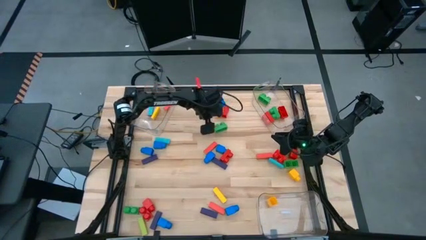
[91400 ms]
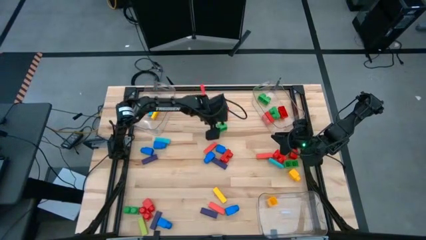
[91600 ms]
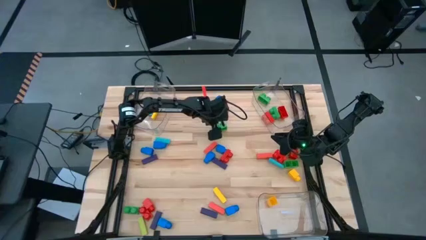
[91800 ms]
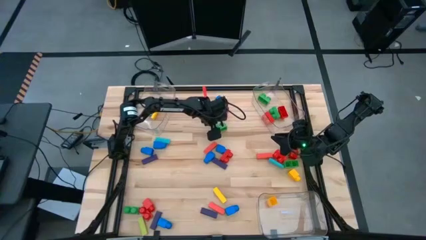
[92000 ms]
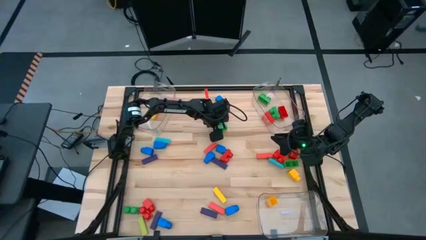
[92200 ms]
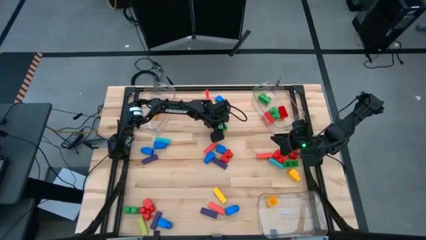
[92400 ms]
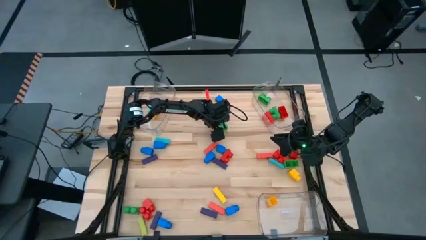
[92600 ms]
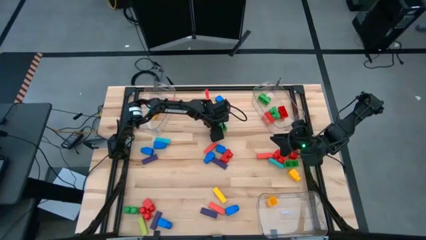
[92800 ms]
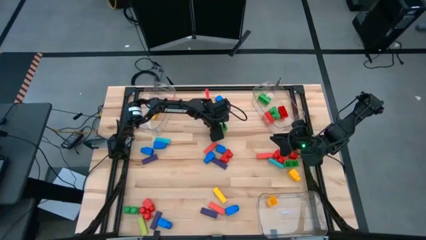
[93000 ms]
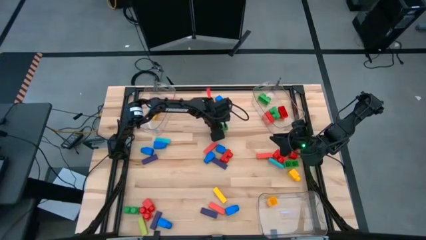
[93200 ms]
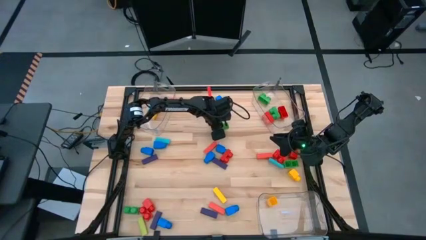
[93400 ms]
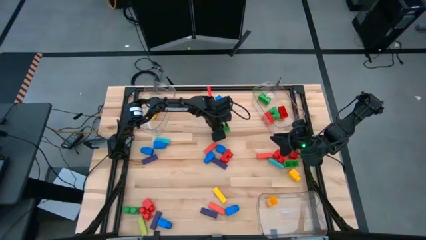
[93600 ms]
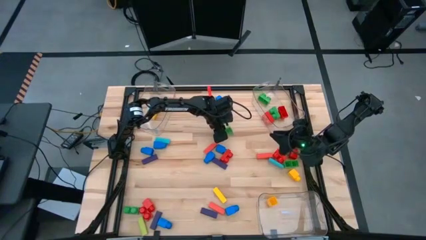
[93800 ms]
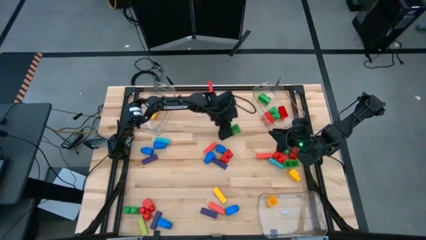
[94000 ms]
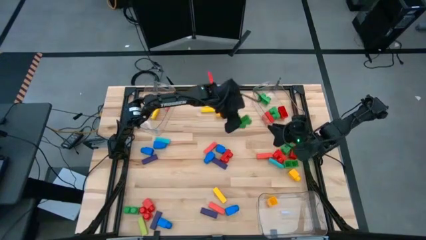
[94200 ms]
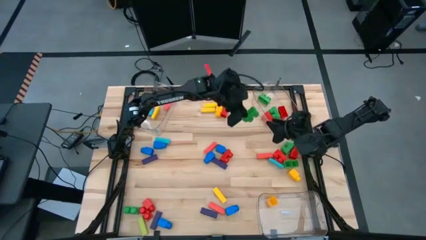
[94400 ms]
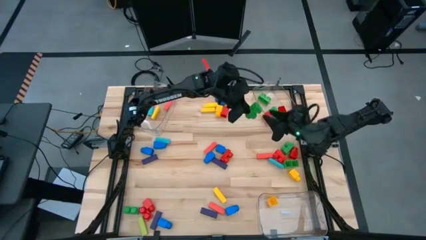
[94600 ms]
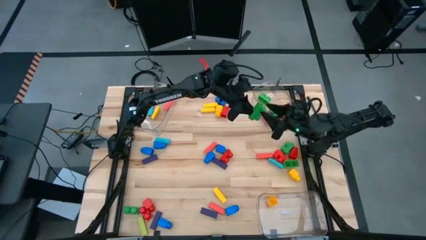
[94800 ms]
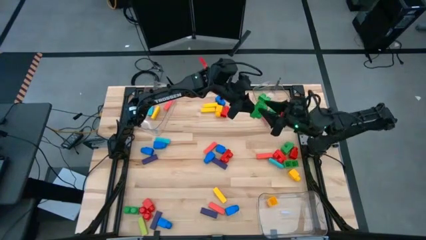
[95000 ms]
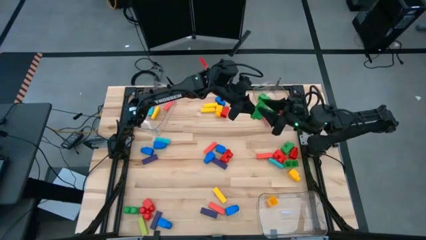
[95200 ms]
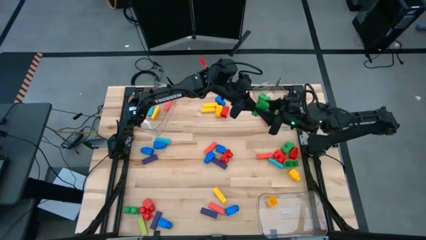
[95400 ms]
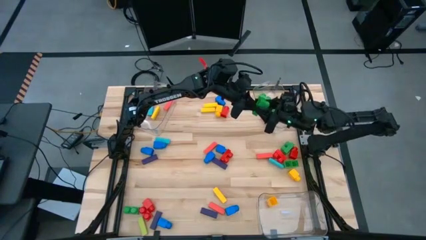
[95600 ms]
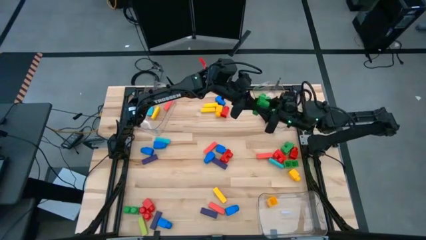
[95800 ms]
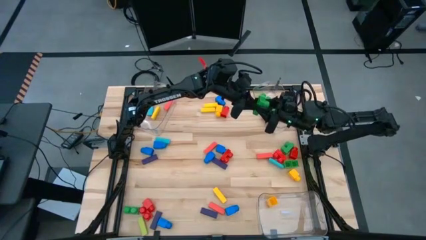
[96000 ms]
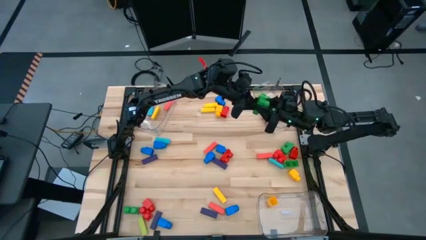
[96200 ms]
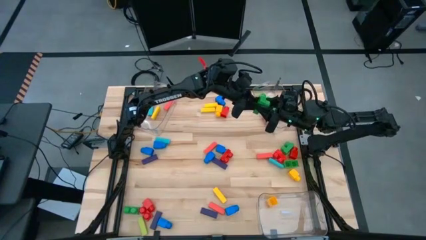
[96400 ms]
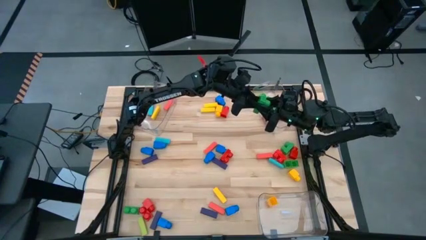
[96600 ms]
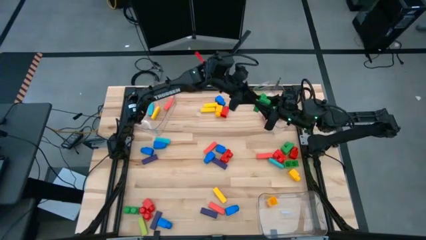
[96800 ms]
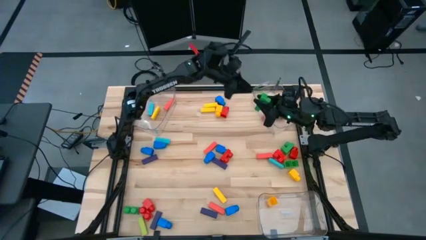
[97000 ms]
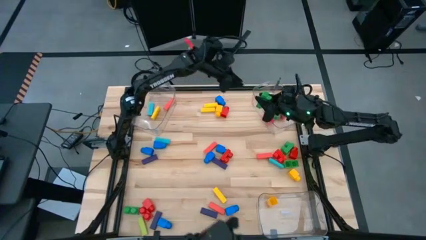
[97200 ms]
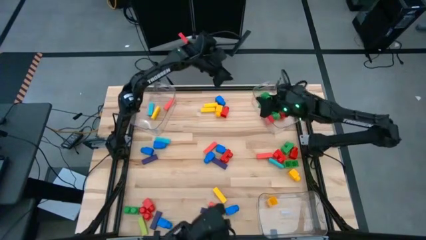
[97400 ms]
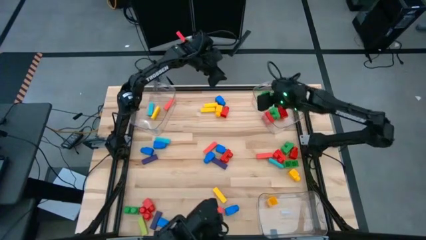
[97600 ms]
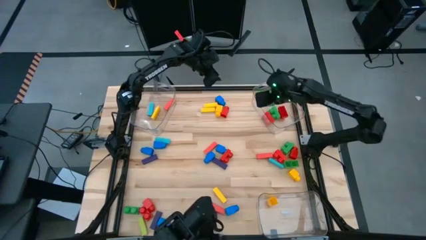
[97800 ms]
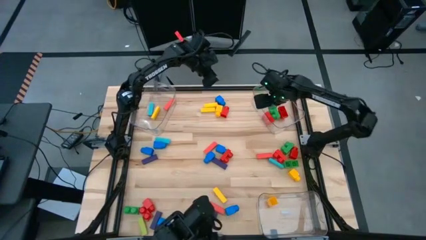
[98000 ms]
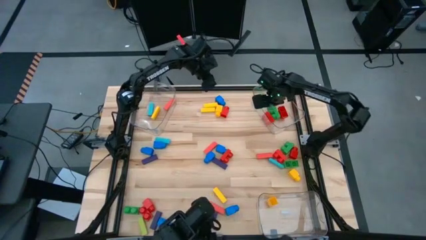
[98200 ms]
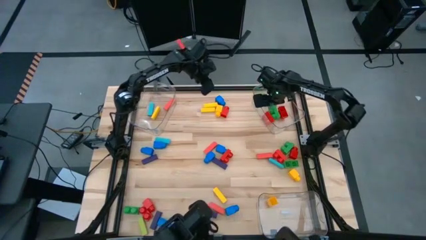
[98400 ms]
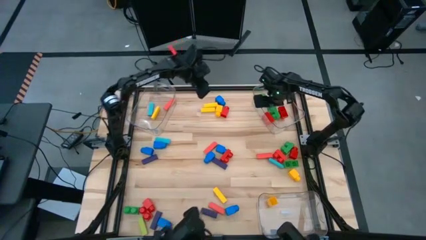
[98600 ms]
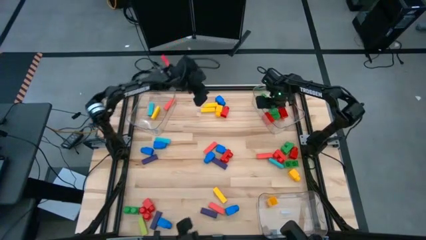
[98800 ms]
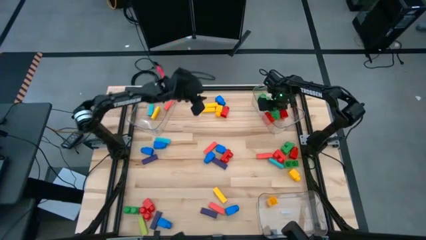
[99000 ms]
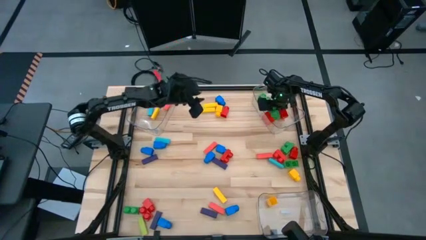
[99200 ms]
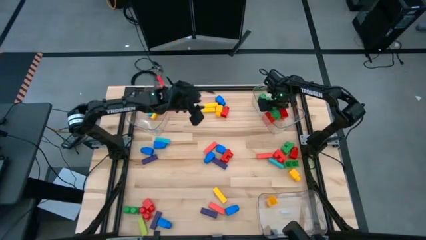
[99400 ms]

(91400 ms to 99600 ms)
Task: Sort blocks by size
Put the green 2 stud game piece into the top right transparent bin

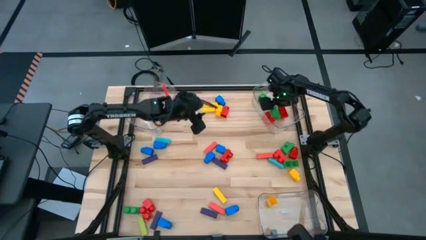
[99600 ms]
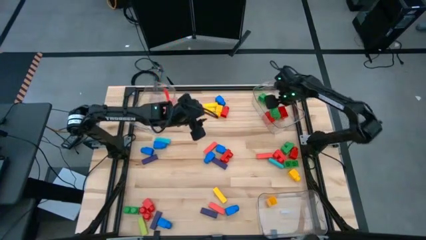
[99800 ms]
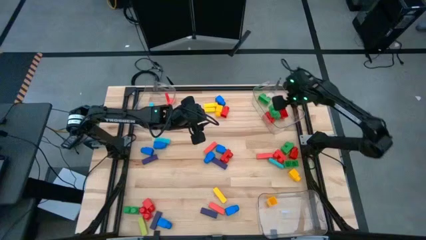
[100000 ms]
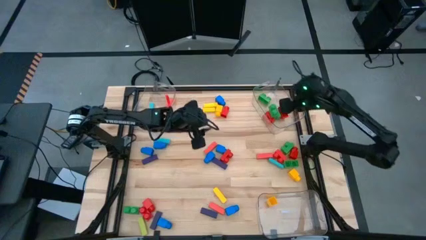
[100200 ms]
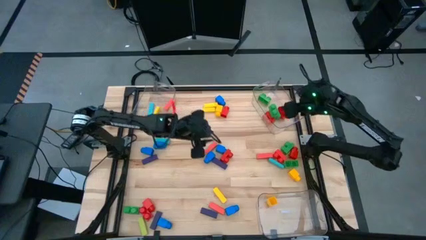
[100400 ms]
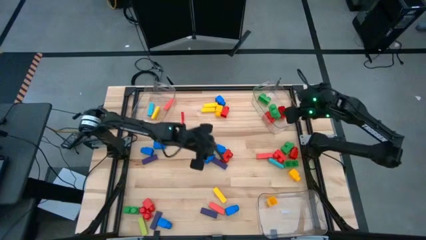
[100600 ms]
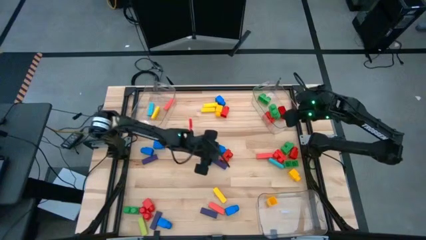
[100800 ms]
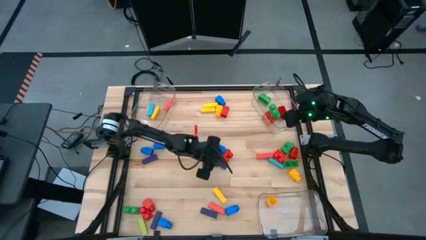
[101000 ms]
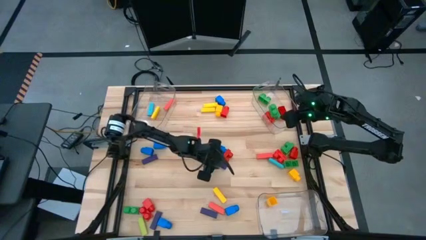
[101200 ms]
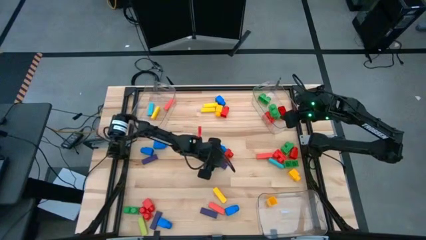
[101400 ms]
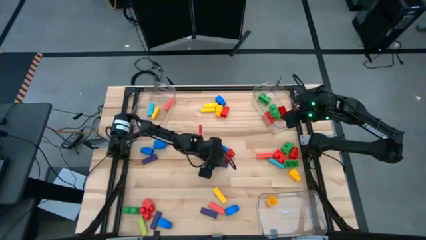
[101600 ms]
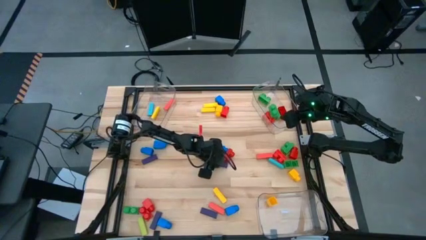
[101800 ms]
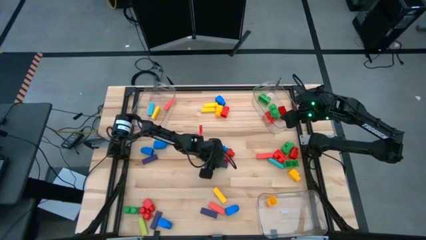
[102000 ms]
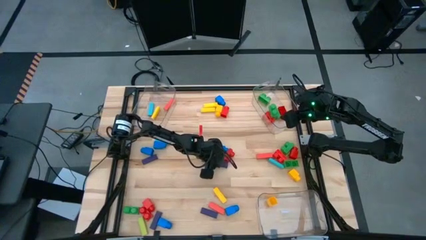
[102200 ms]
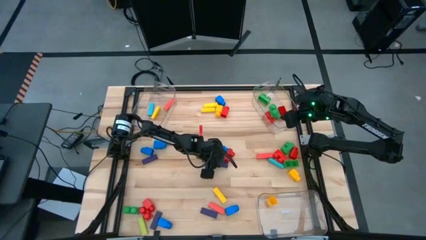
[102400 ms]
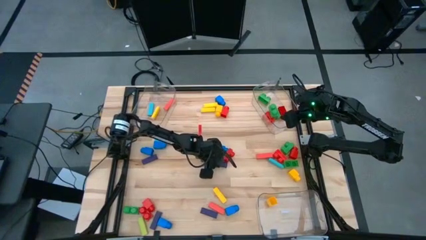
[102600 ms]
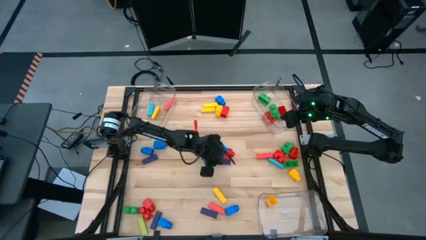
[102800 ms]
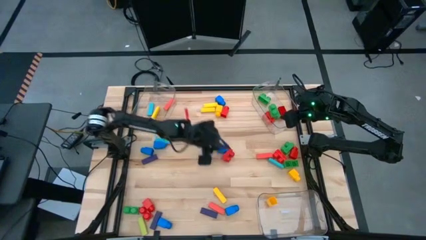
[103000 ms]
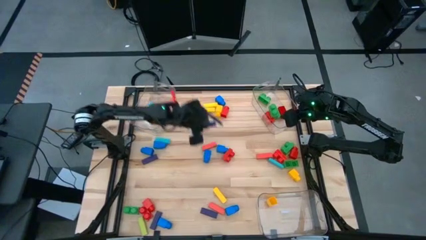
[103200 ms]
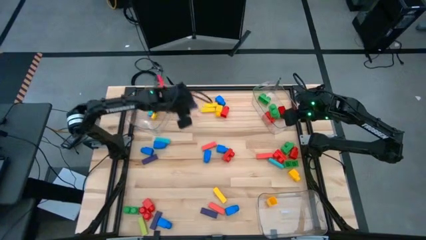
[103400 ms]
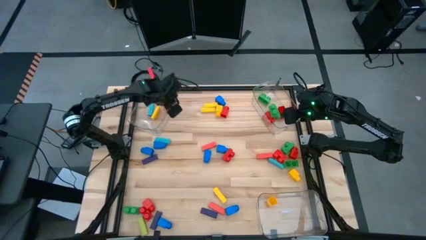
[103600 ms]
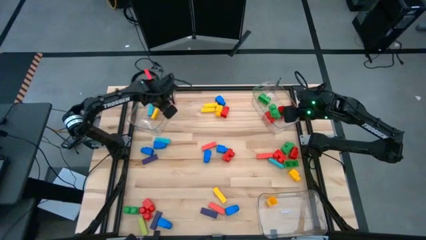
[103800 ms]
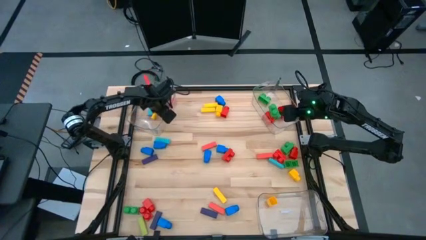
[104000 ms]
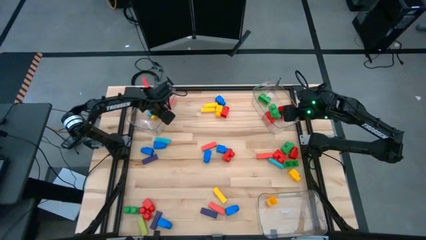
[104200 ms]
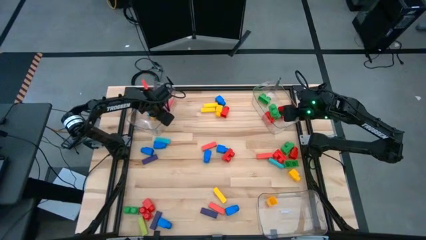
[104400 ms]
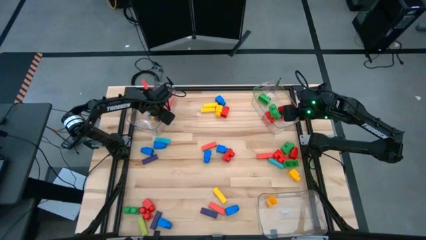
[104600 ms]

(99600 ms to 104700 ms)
Put the purple block into the top left transparent bin
